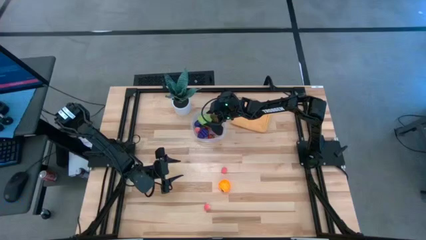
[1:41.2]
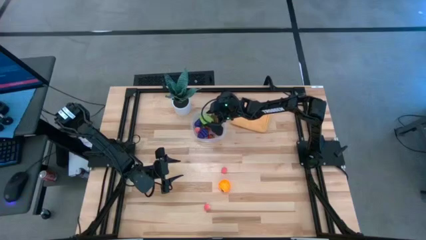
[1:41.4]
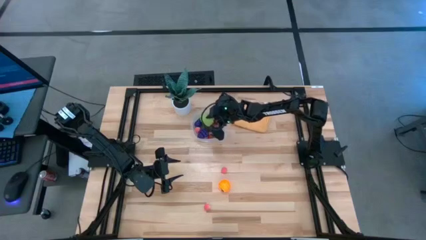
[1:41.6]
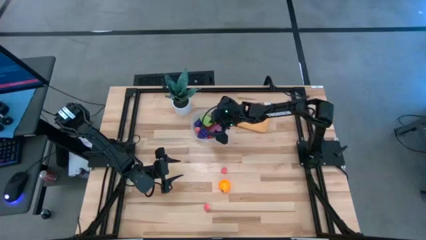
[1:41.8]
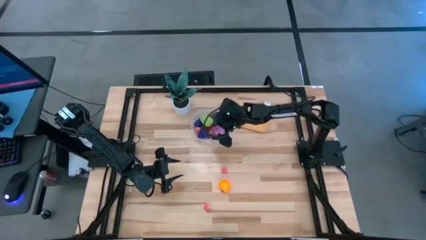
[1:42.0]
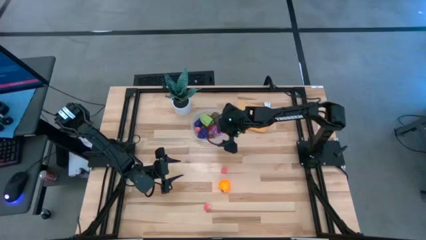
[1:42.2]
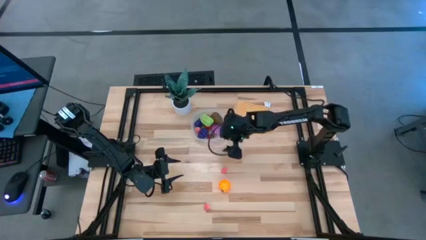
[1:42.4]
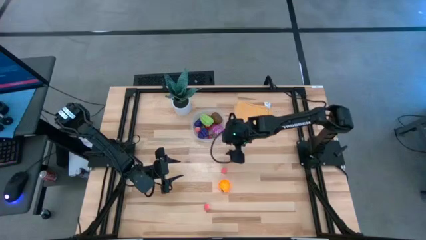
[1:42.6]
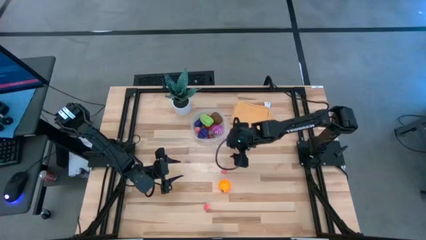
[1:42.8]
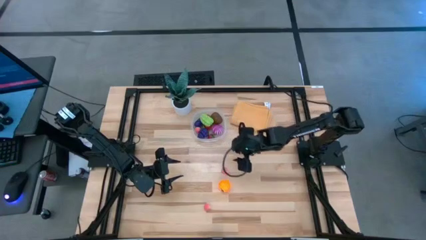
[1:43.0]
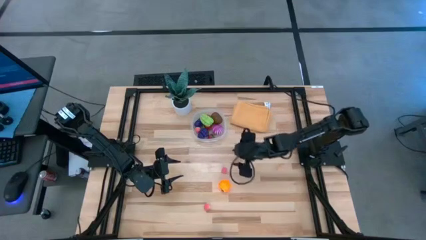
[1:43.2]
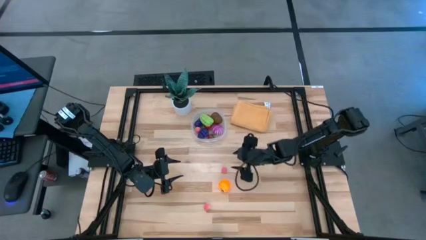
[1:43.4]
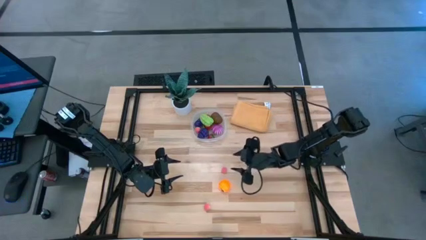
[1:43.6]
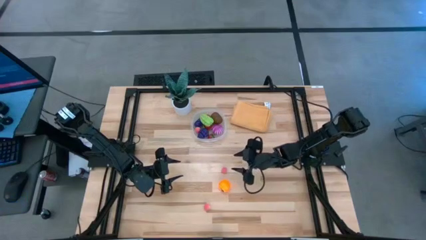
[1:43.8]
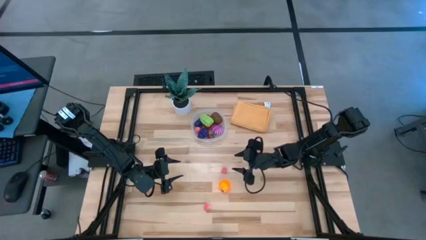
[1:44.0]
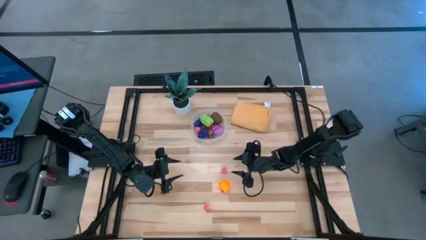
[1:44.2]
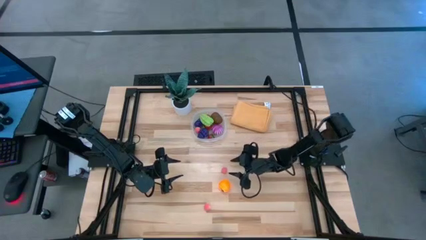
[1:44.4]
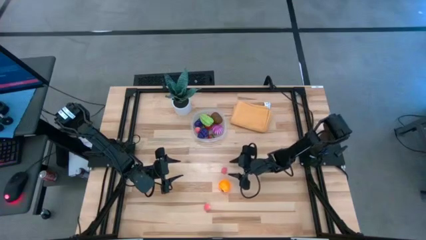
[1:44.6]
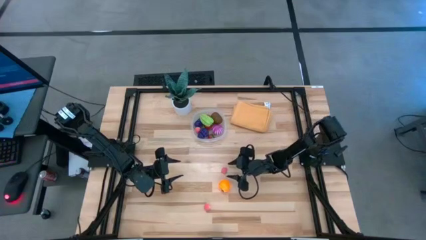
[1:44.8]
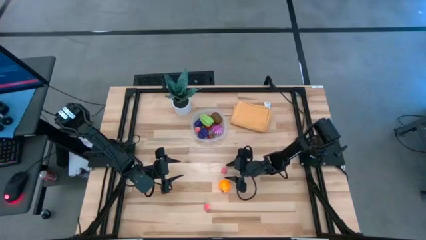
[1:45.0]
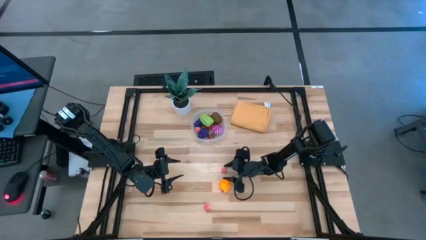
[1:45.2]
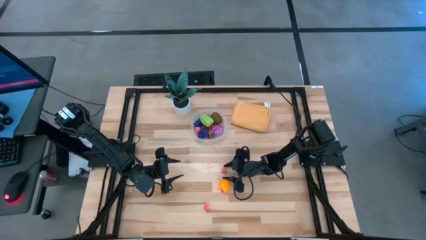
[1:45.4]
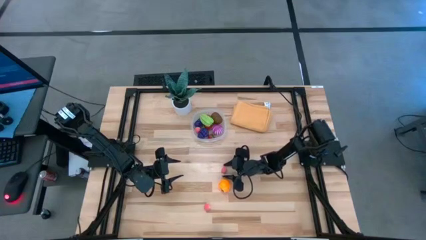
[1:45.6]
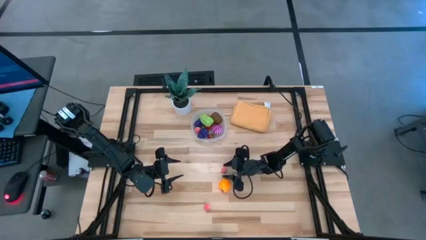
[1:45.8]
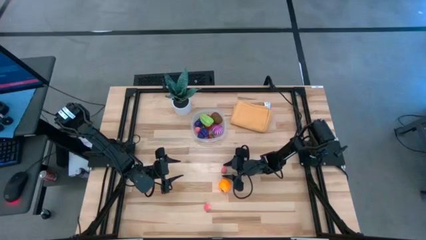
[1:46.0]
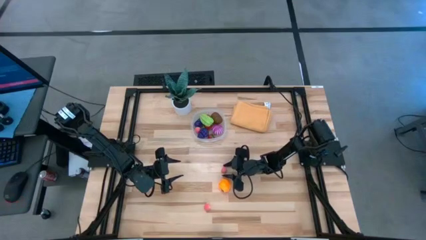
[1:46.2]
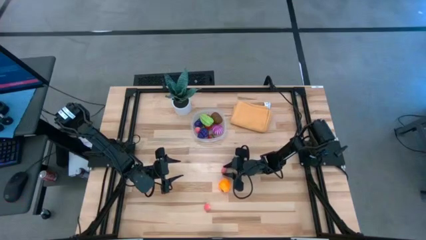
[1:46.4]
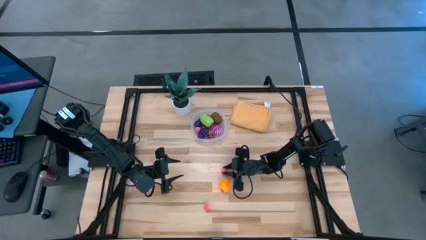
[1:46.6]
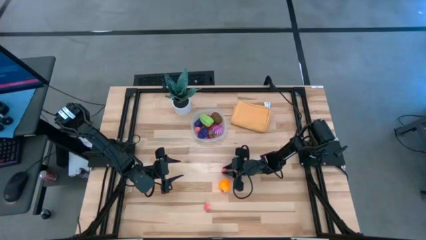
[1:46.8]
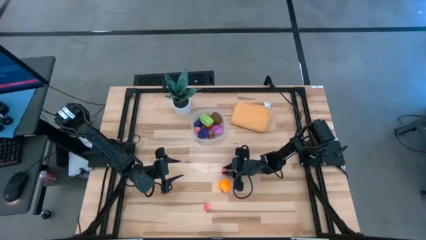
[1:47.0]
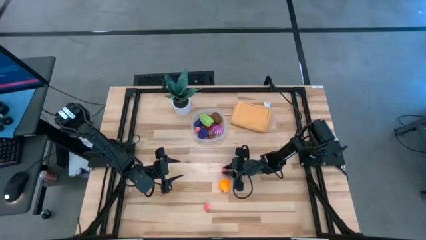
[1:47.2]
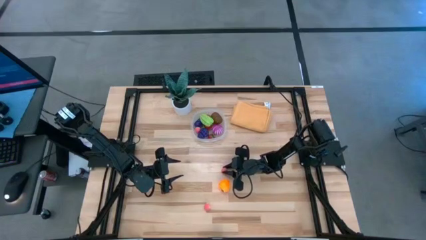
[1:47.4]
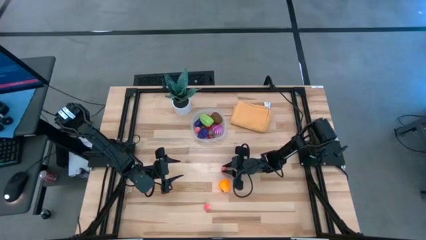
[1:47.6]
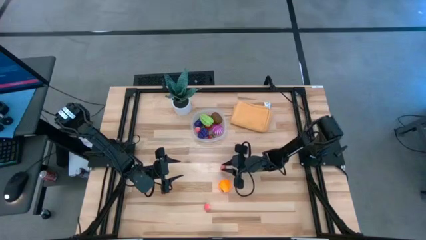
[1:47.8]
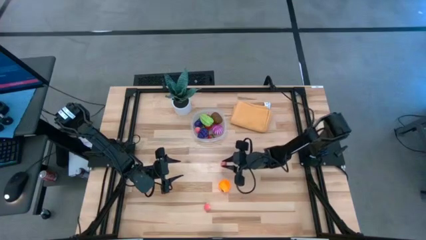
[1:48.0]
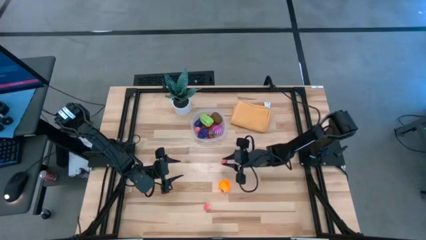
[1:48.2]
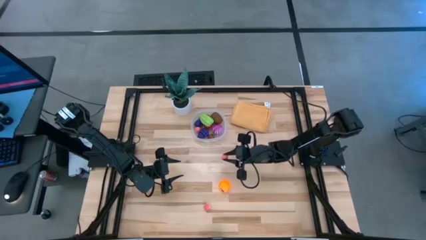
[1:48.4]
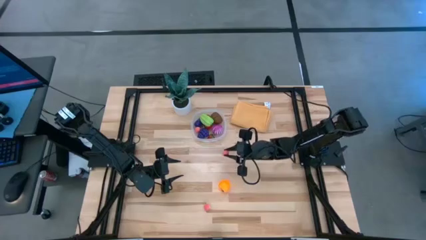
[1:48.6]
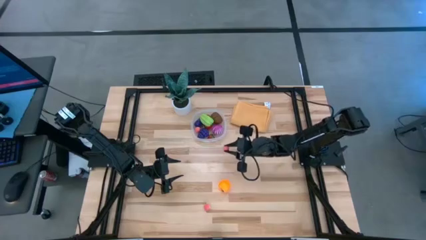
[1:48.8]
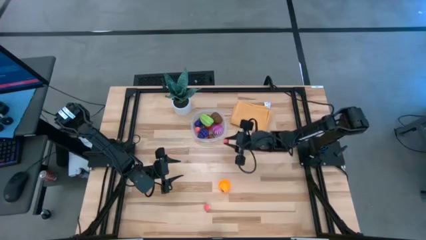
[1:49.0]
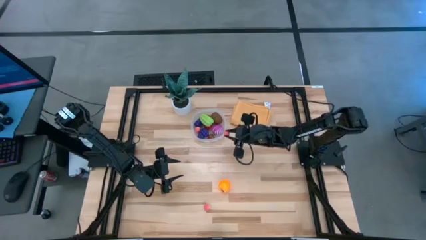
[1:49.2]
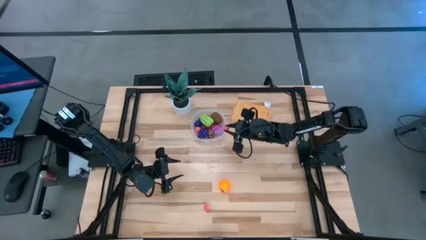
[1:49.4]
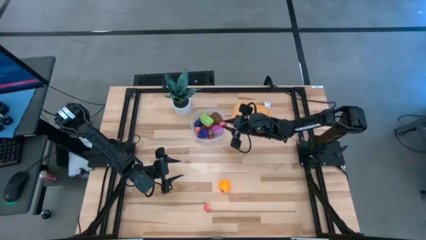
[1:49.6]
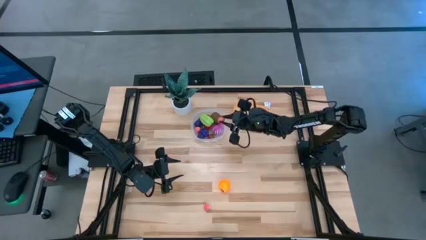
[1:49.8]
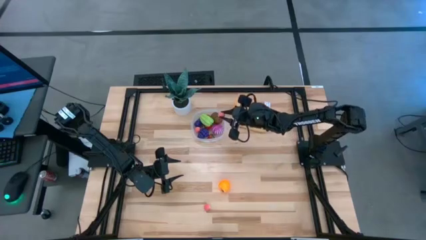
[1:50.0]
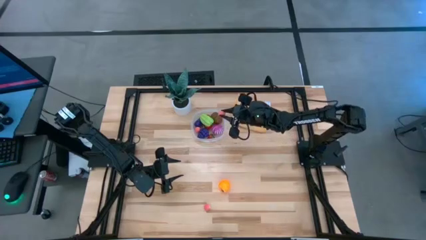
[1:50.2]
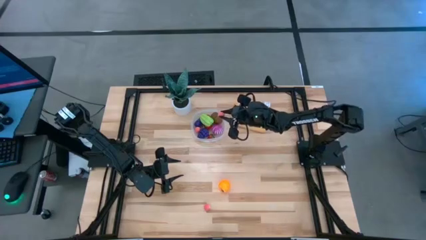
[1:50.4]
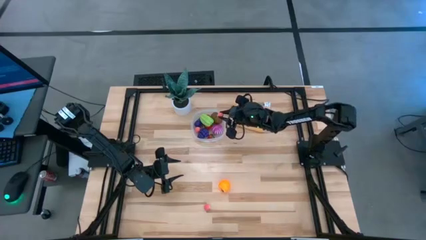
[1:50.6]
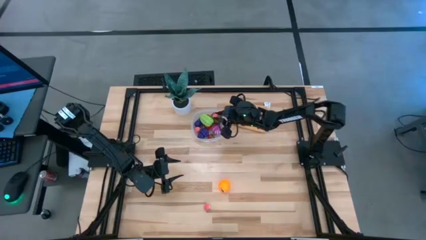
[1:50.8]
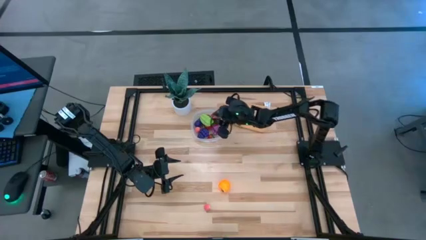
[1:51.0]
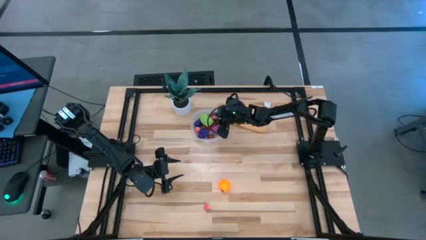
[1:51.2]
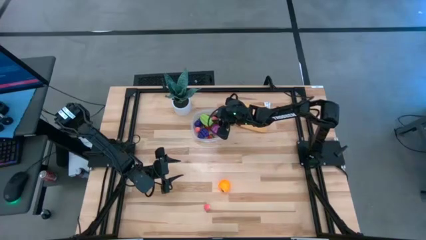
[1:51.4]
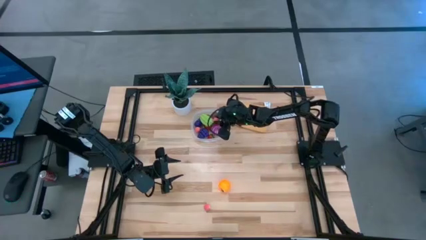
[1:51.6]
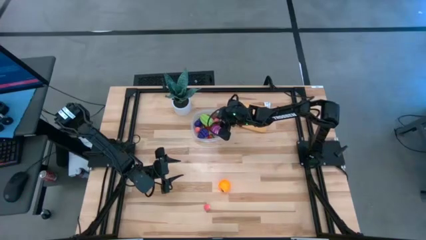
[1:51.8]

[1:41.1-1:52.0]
Task: Pick and placing Produce into tupperware
Put the top pink peach into the transparent bin
